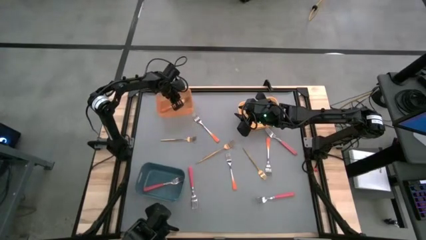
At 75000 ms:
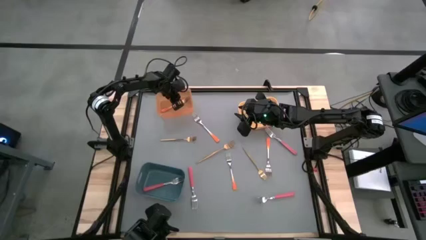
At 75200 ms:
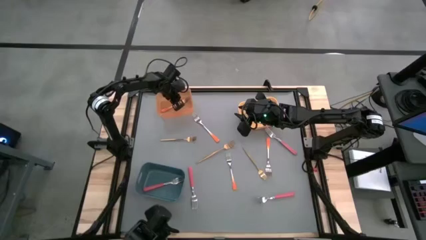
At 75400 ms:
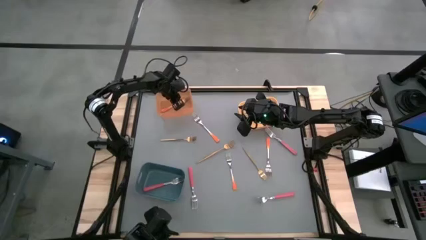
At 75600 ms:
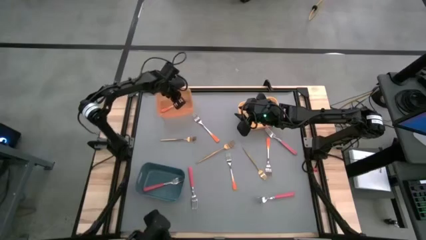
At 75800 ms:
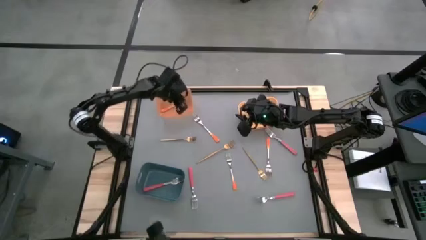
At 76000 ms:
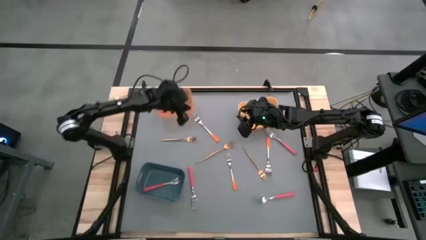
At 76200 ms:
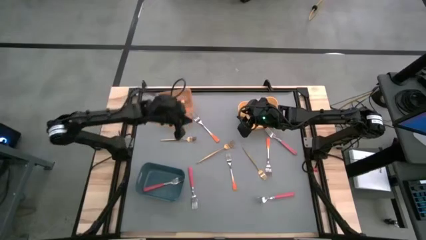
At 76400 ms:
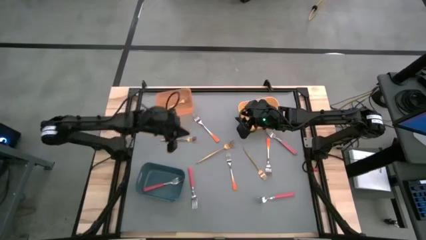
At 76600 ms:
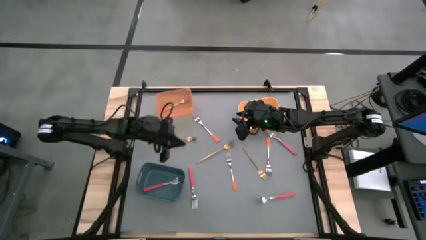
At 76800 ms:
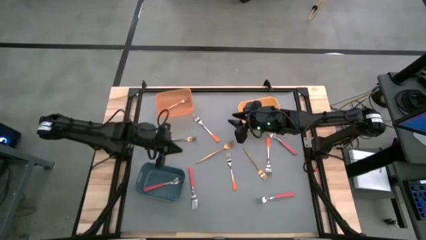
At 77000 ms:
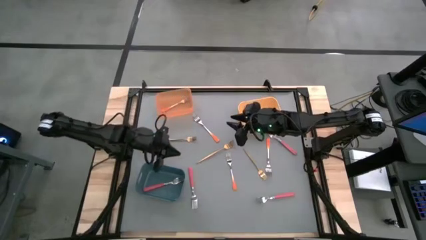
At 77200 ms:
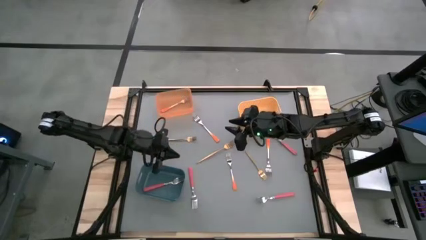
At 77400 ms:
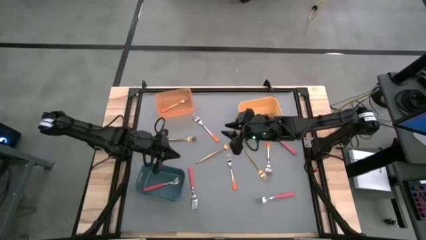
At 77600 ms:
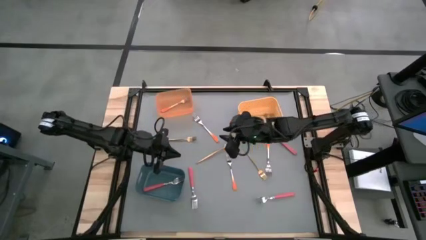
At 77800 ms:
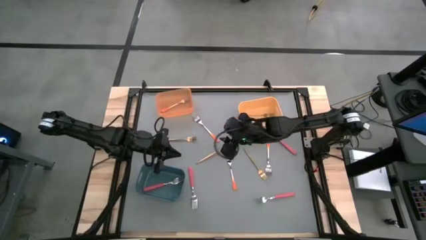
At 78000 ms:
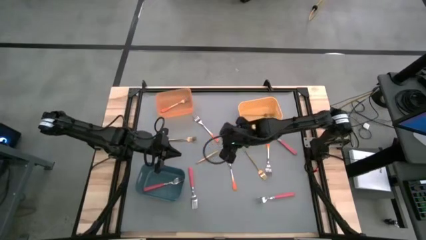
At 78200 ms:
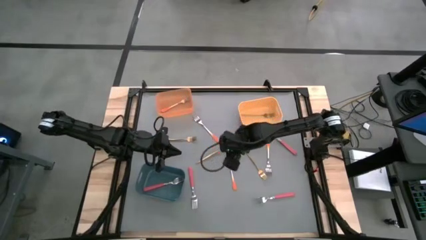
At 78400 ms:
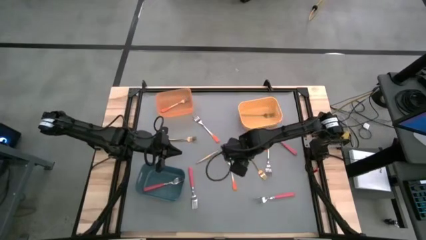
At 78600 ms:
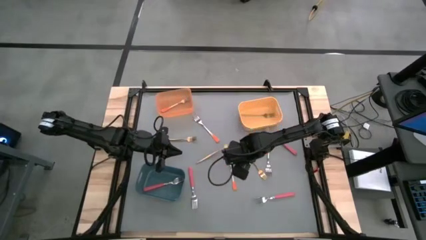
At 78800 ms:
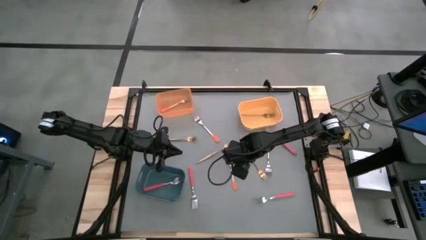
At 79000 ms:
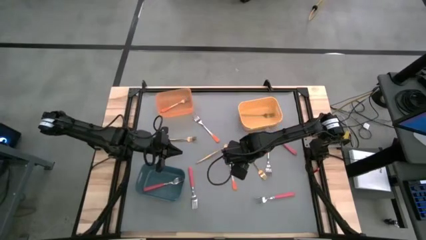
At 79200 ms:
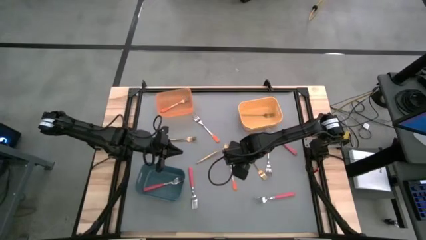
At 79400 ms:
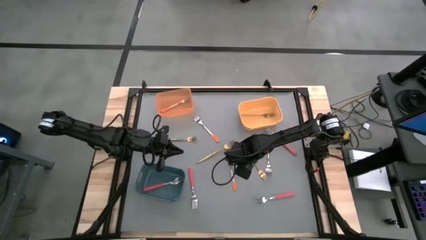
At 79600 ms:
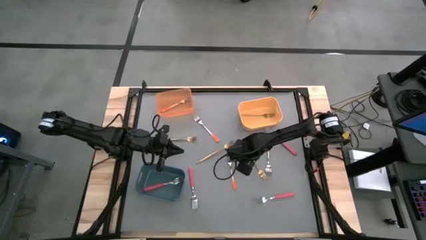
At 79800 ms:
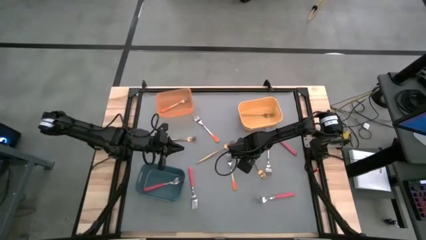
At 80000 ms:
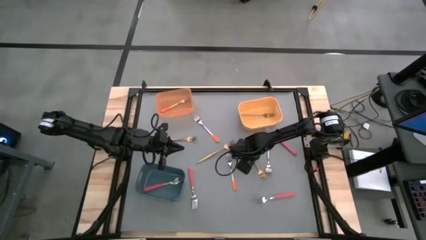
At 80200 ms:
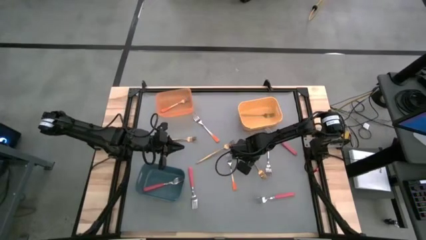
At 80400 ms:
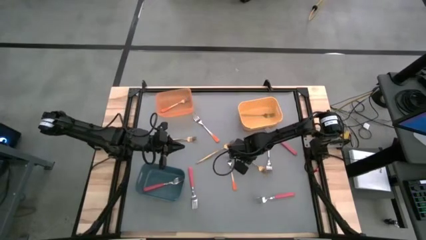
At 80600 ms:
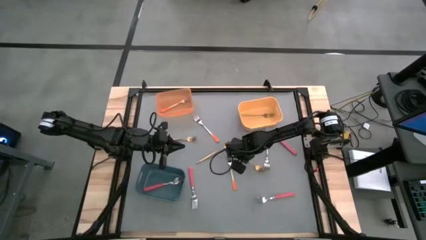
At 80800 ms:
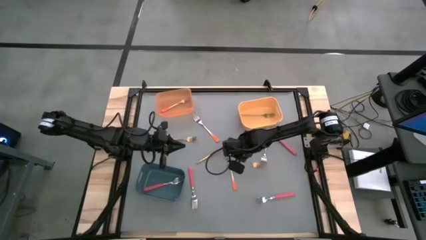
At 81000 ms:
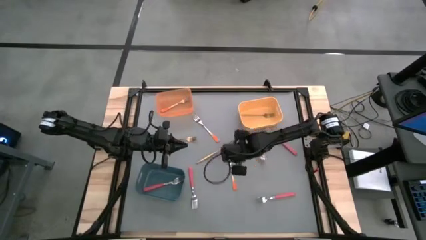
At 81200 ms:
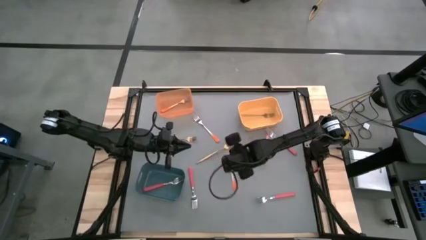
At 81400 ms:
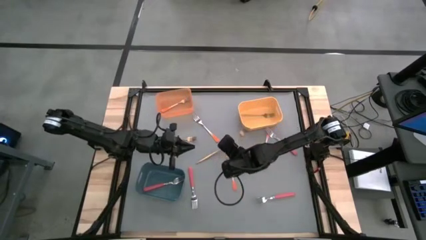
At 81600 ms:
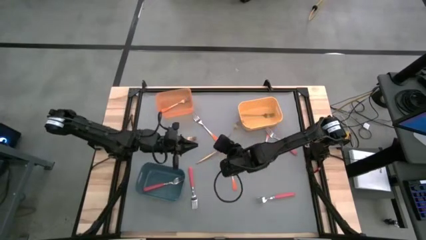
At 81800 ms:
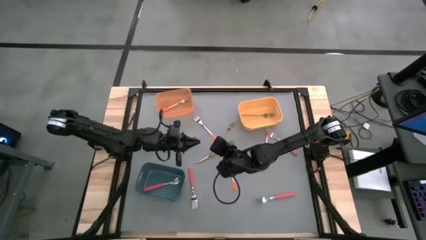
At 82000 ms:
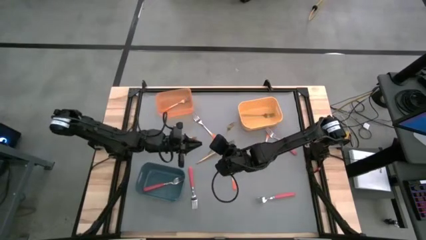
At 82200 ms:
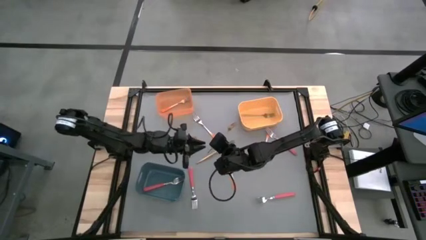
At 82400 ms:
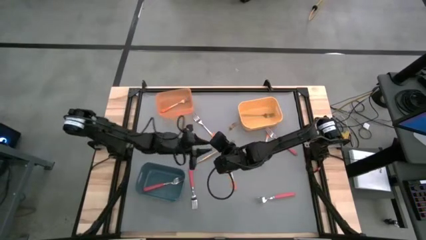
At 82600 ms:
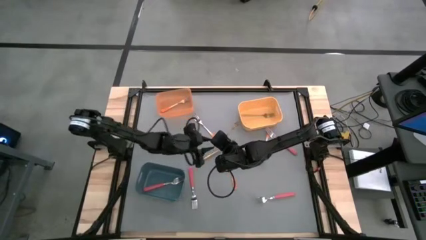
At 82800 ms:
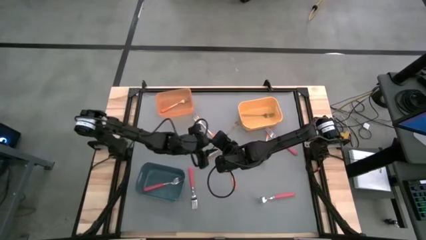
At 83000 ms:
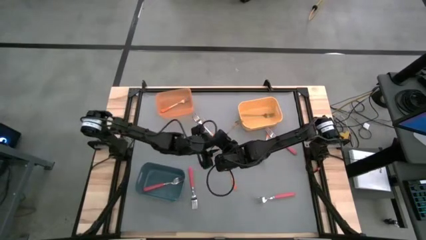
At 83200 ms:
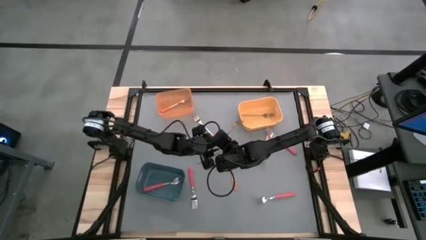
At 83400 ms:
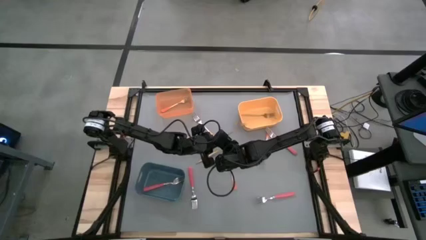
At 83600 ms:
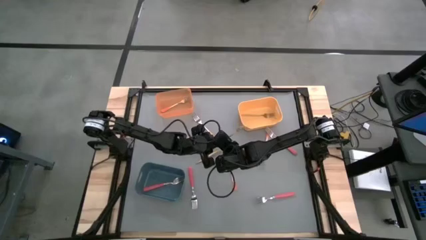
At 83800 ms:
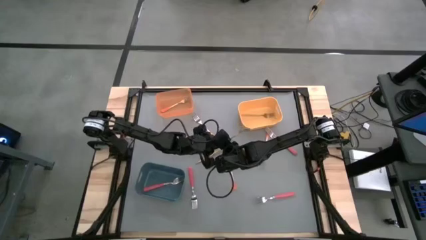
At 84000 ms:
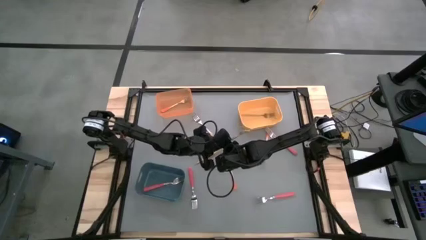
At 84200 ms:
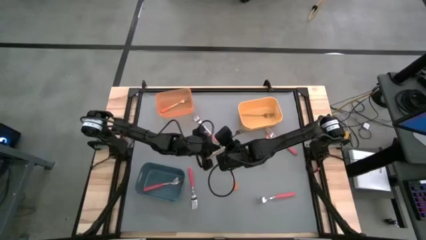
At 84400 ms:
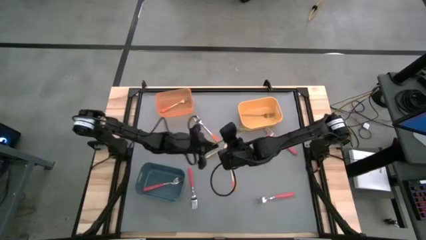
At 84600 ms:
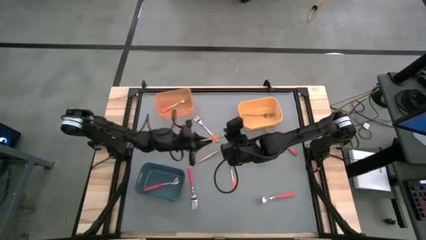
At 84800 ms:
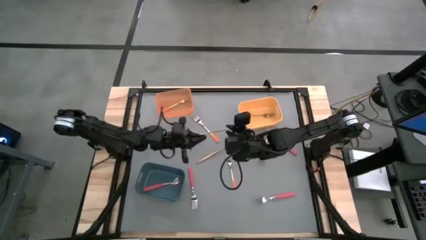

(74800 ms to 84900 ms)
Task: Sort silverware by color (type)
Put the gold fork into the yellow bin
